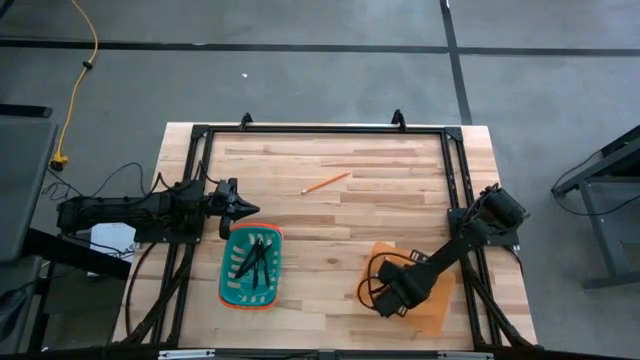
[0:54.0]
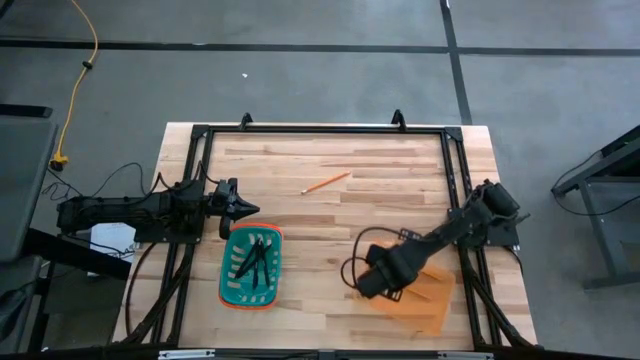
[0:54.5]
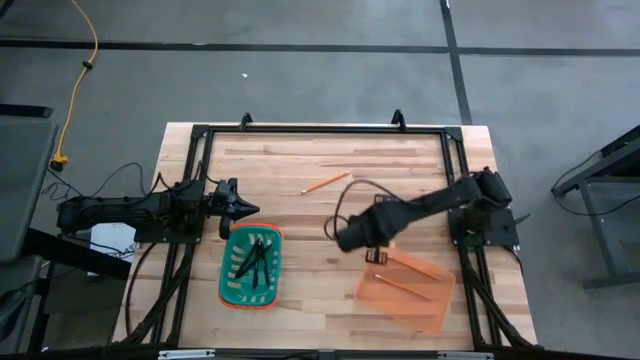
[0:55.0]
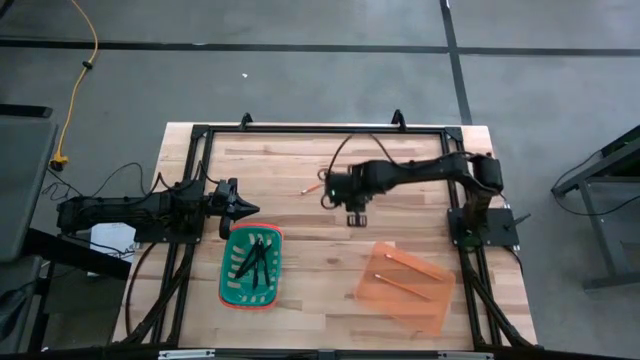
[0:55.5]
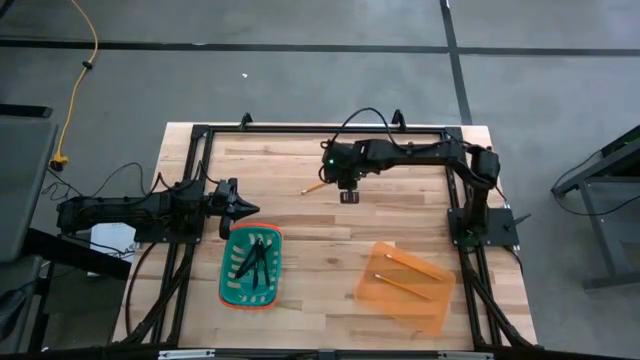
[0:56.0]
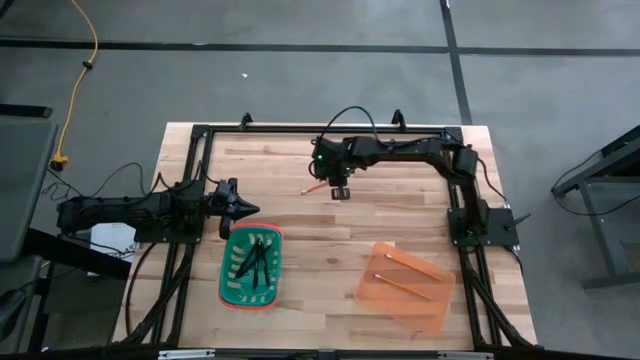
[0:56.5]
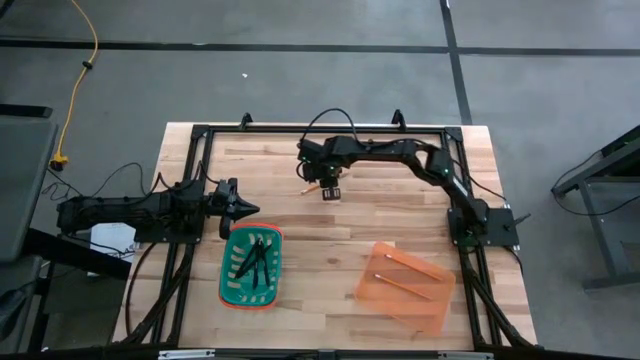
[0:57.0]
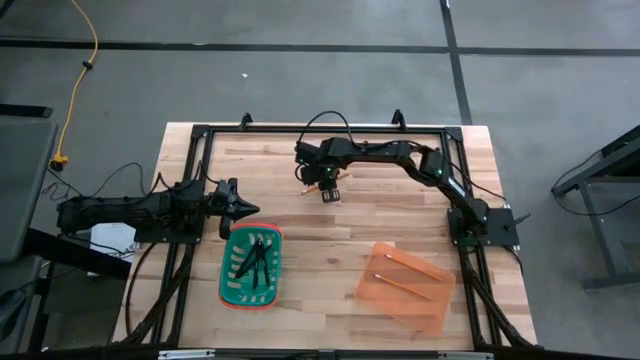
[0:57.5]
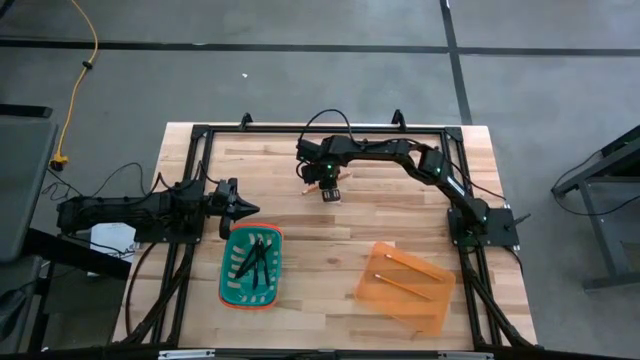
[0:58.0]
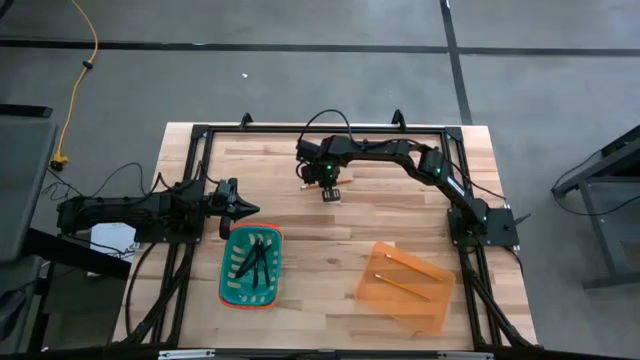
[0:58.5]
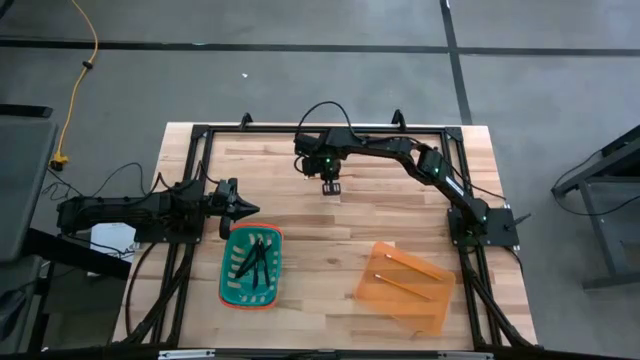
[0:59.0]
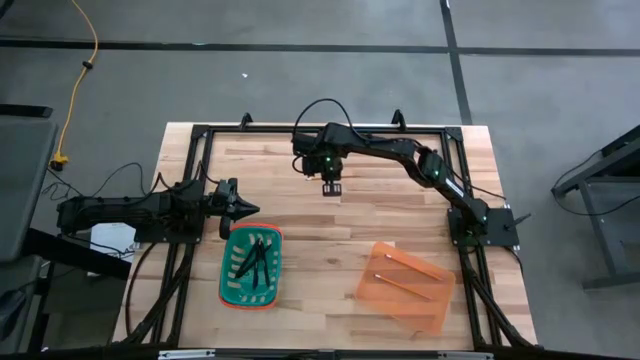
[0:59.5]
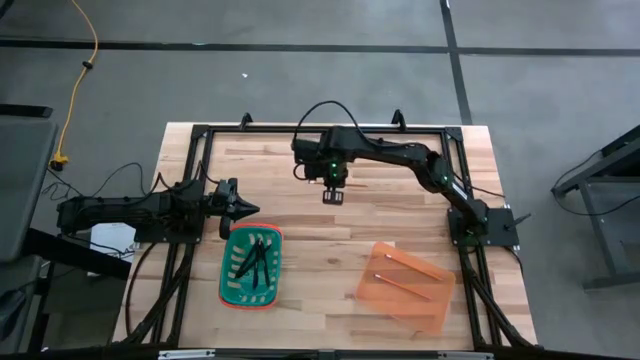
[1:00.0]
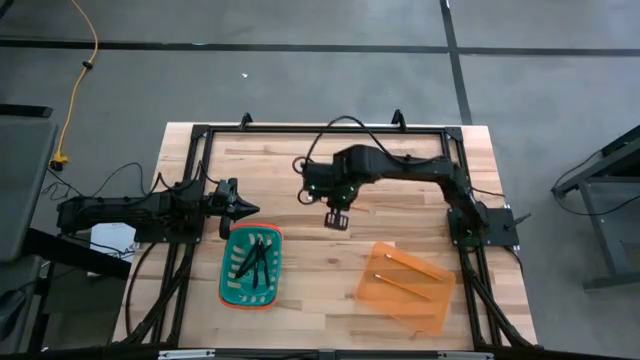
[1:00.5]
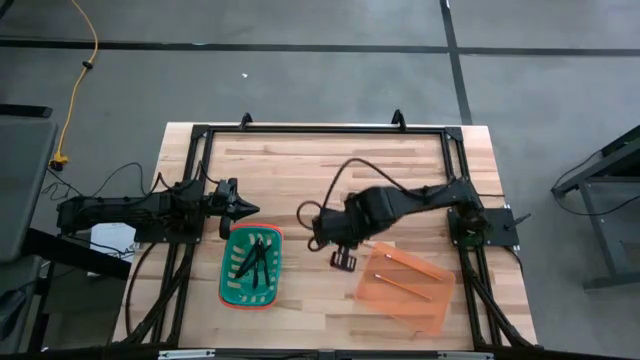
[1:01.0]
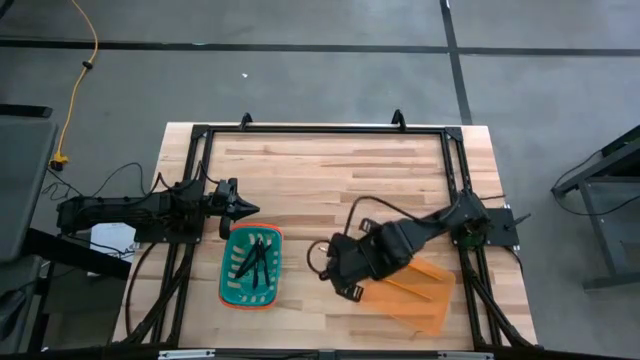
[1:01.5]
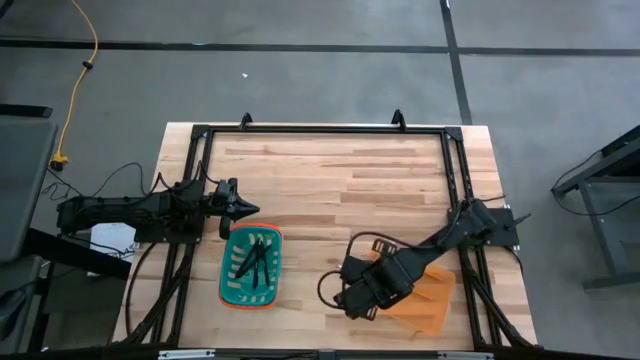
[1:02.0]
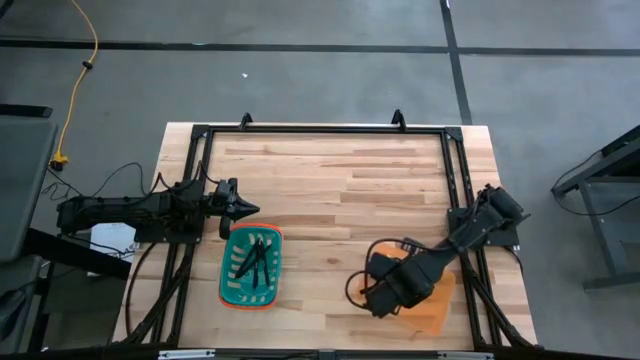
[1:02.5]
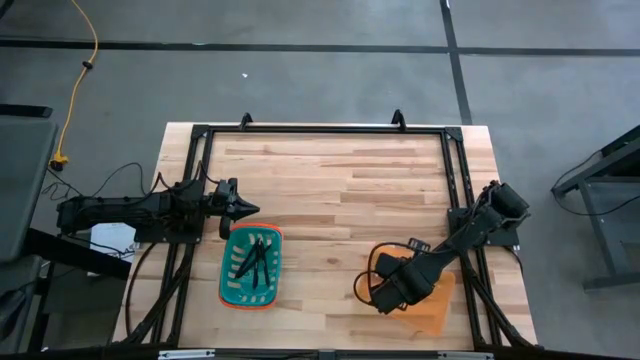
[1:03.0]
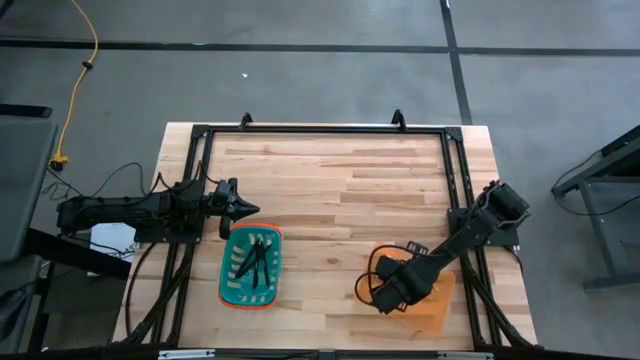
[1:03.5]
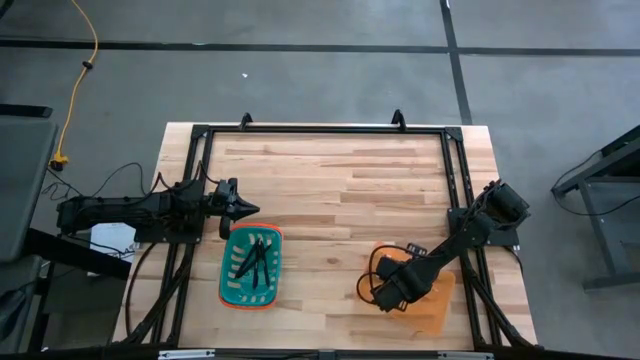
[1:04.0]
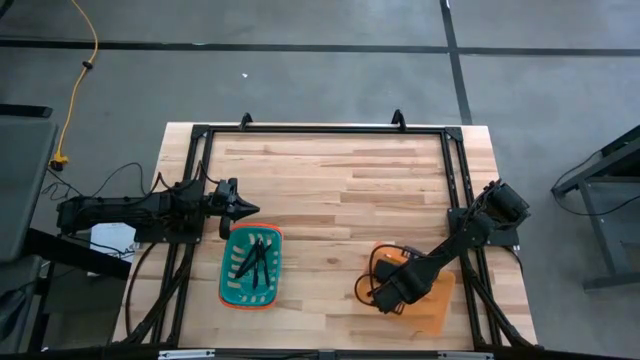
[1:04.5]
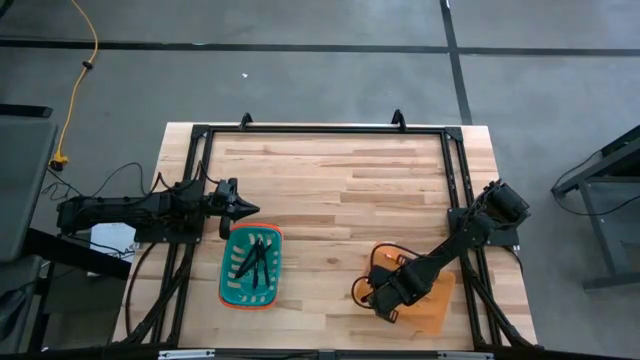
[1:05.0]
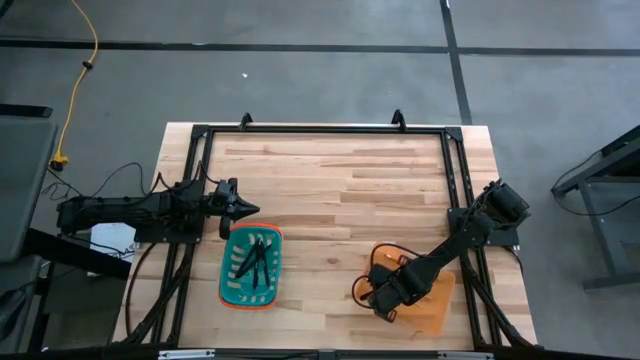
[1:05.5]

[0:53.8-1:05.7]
Task: Sort pens & pencils
Put the yellow pencil into the orange bin

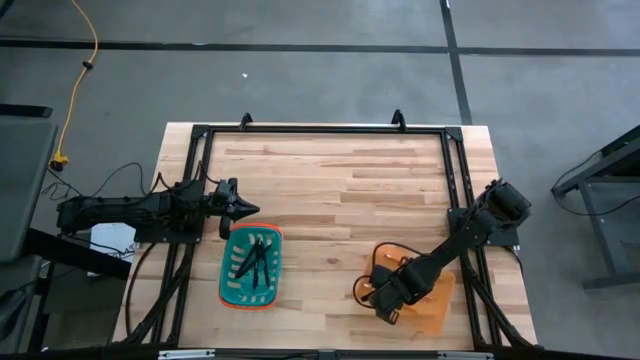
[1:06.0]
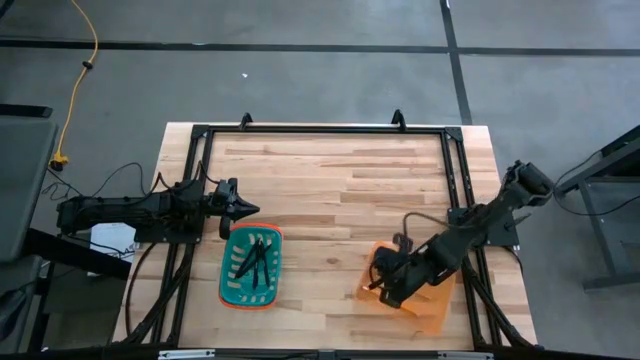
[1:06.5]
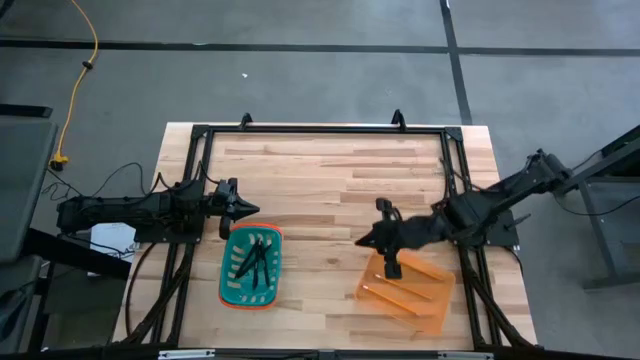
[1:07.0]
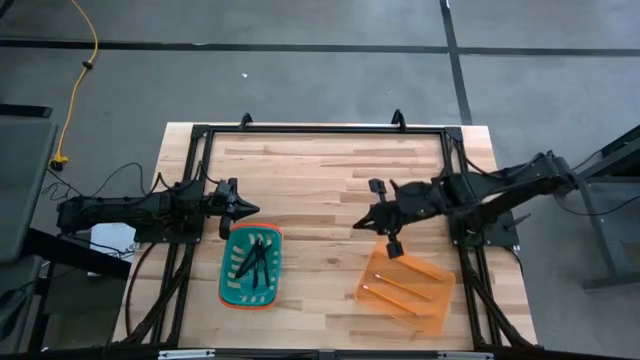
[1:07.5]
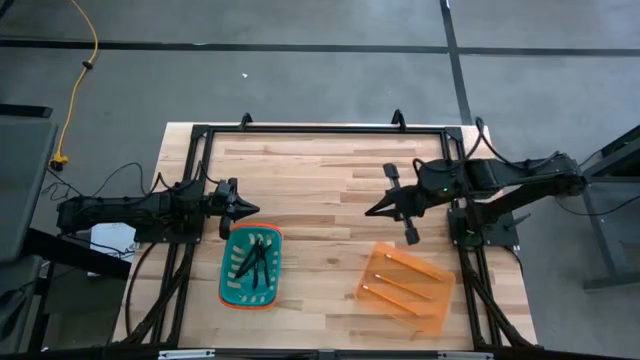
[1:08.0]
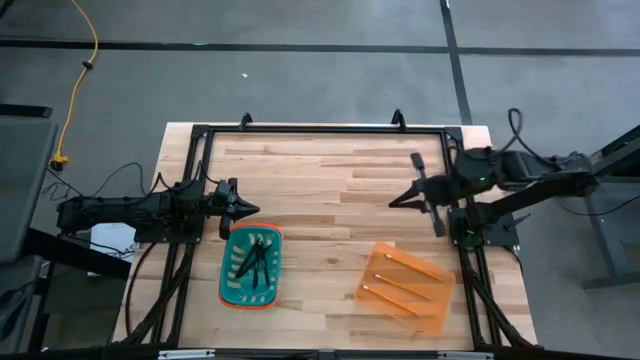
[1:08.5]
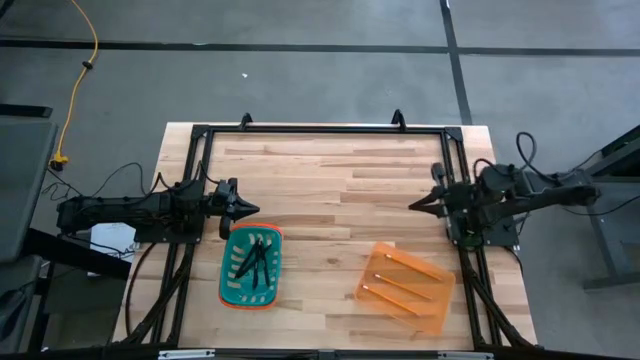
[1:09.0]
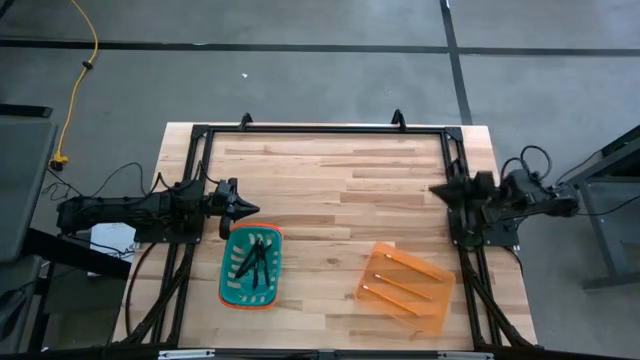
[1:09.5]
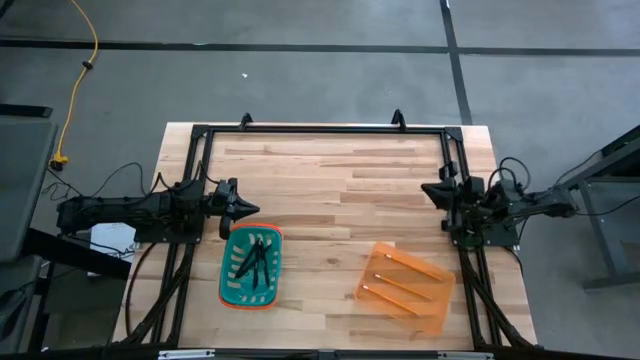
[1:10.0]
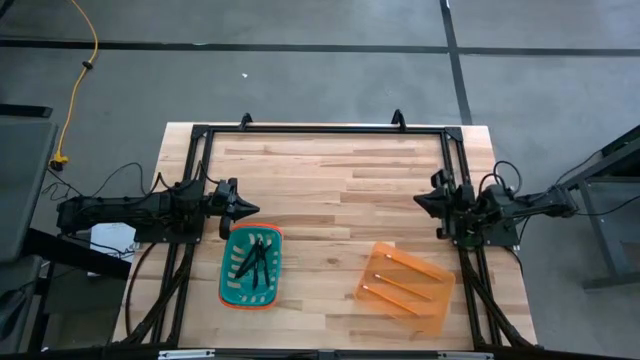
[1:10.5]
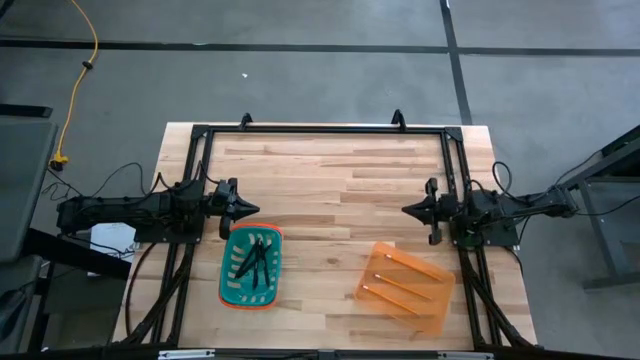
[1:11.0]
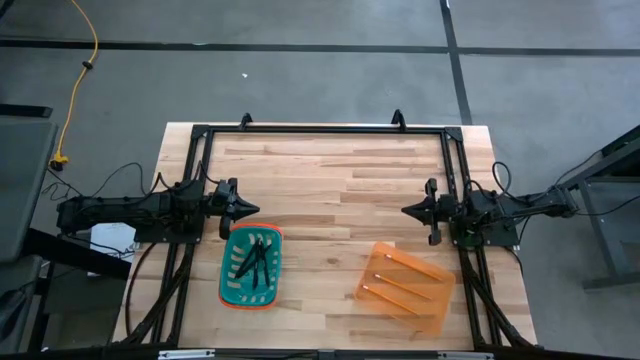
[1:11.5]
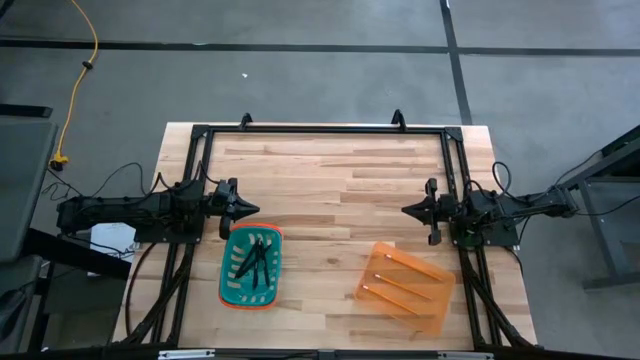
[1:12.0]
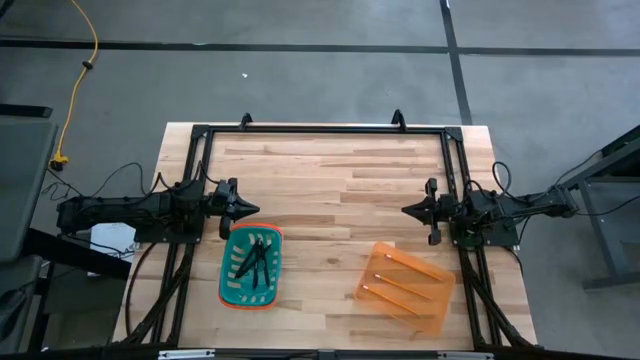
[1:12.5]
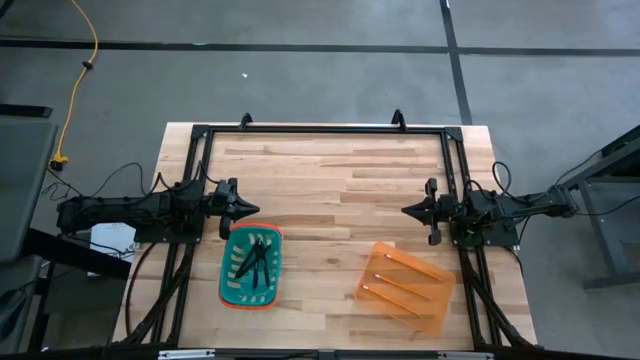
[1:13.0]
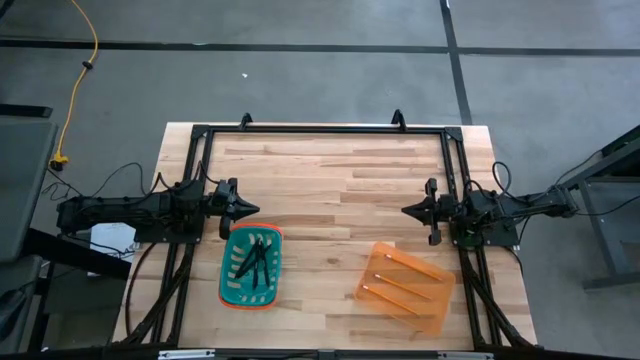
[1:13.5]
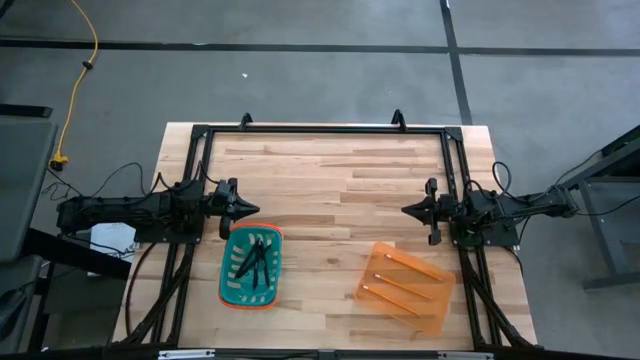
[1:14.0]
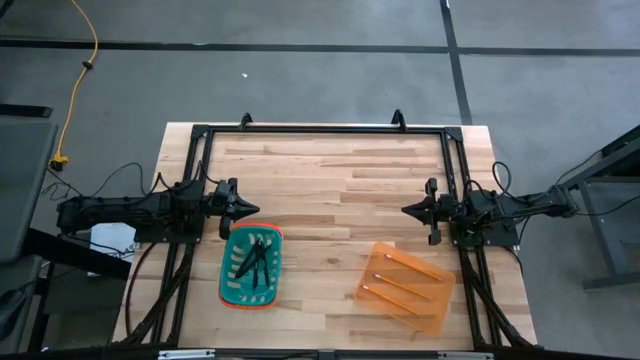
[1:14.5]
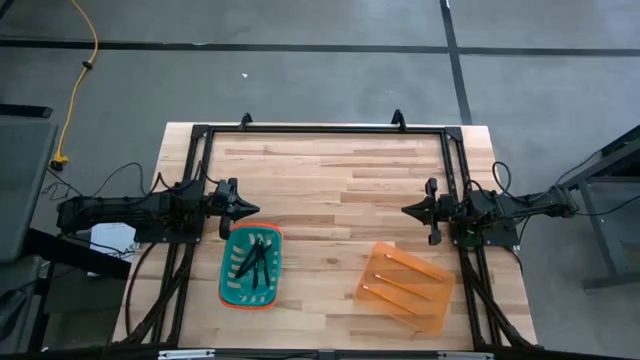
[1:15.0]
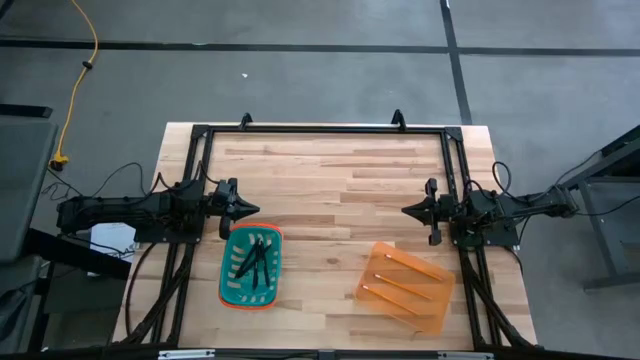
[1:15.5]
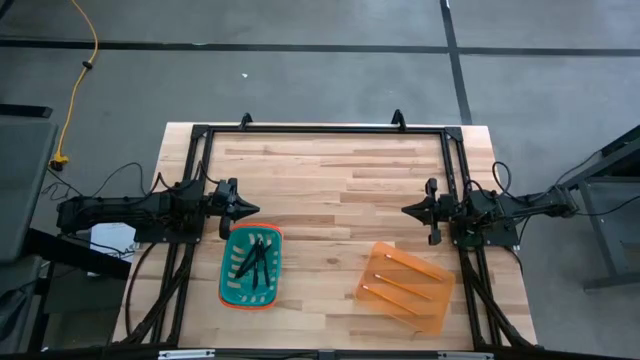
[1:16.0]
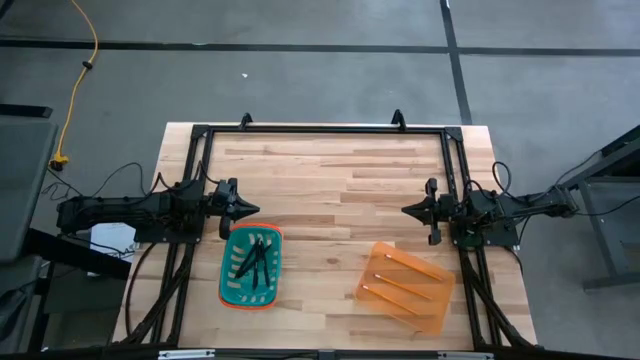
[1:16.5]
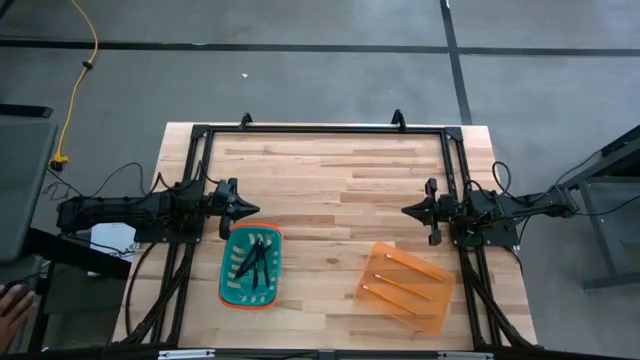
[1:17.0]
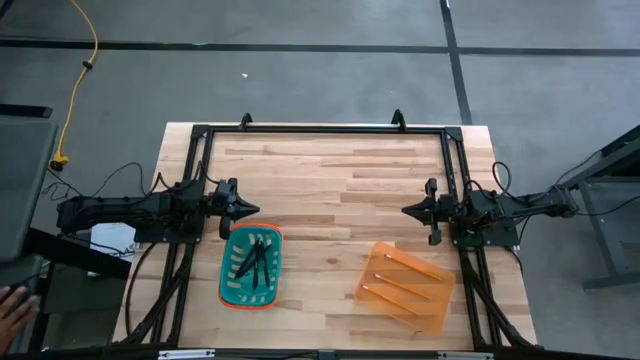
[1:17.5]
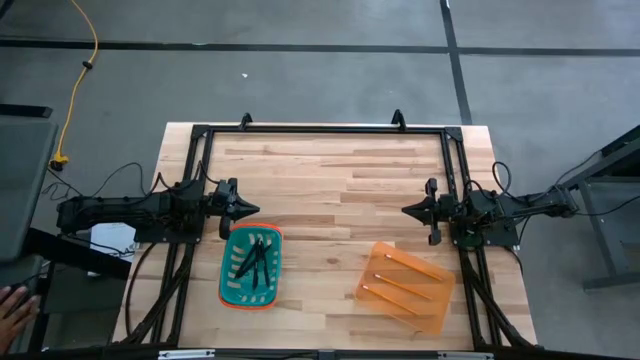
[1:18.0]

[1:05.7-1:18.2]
Return to Home Position
